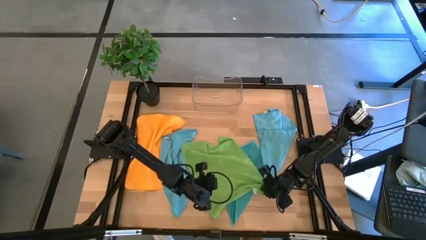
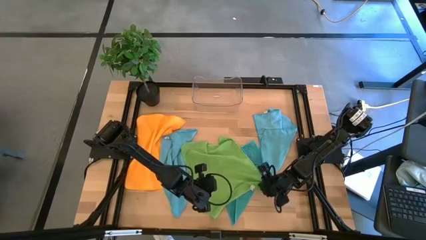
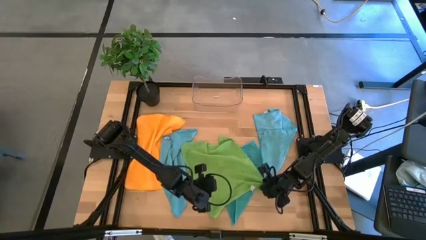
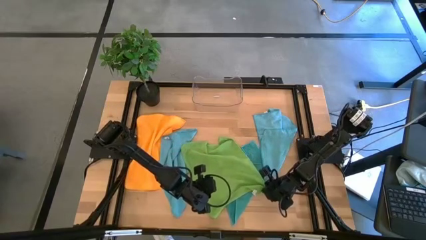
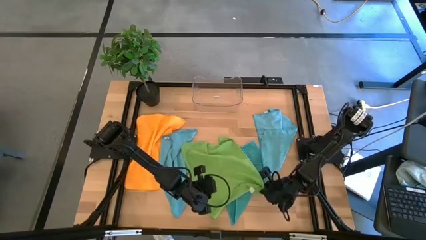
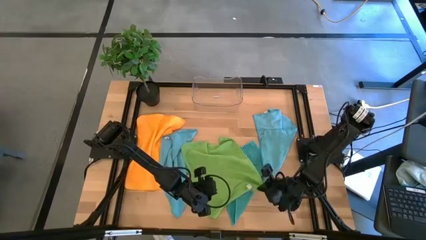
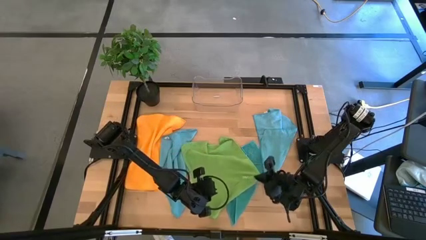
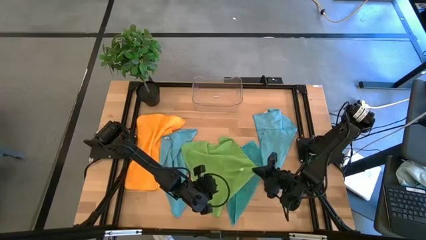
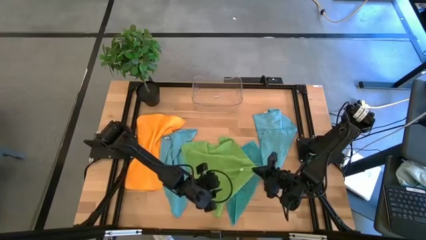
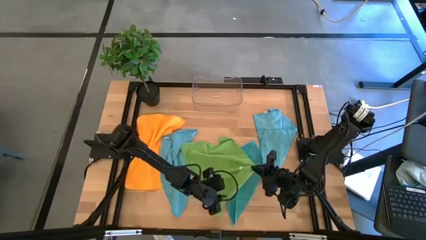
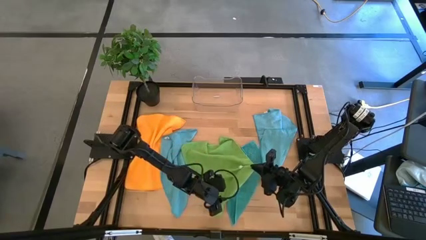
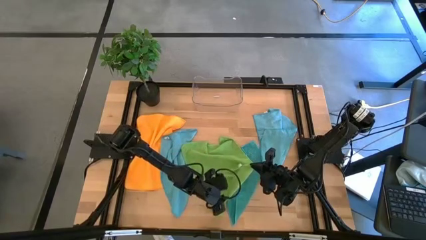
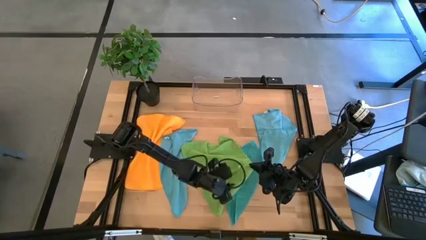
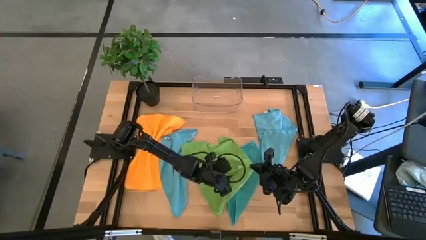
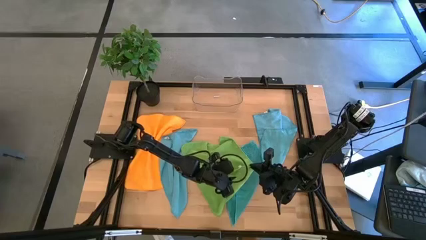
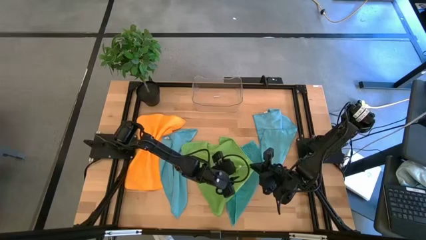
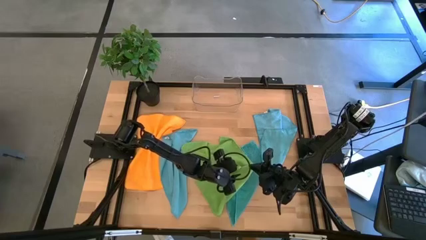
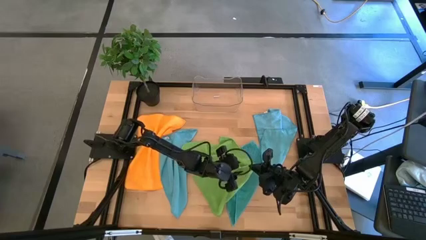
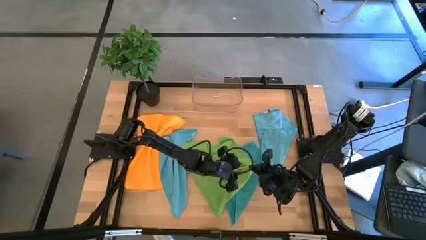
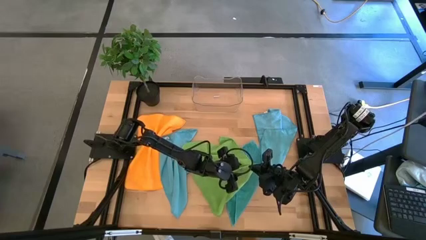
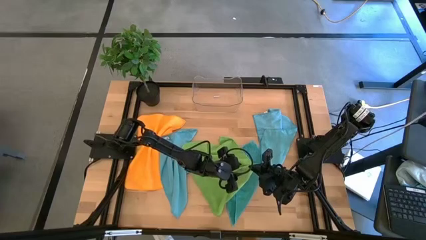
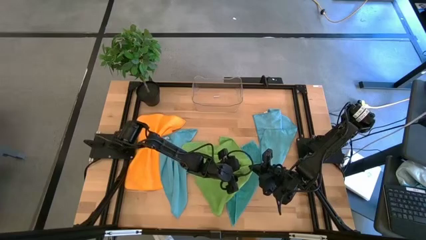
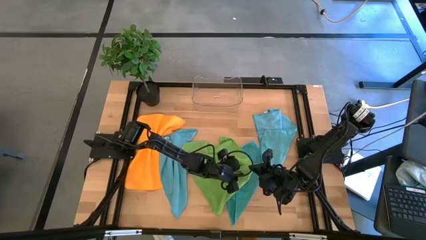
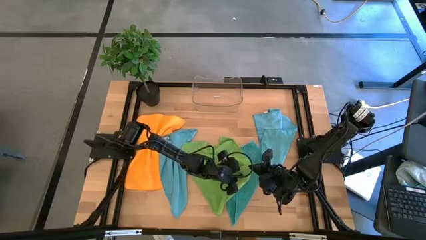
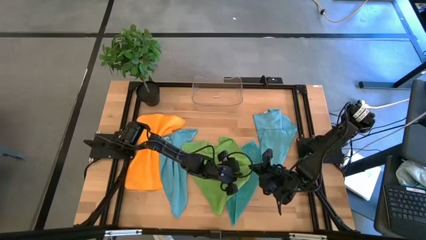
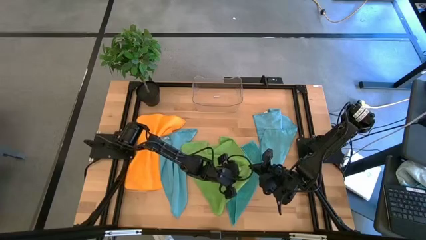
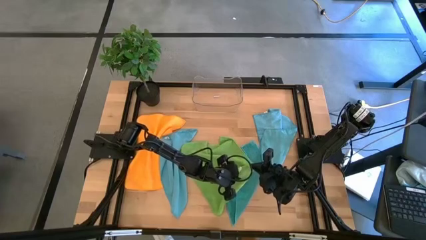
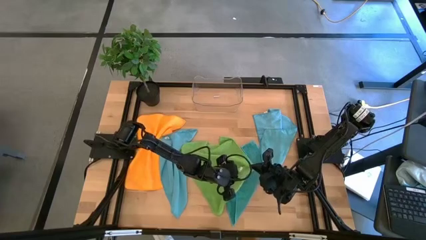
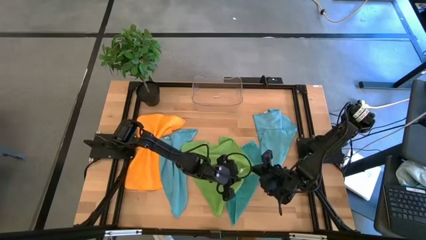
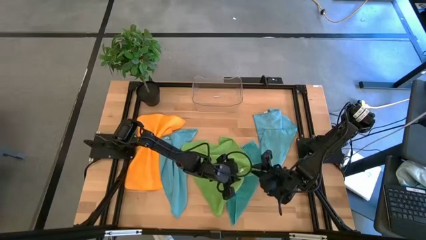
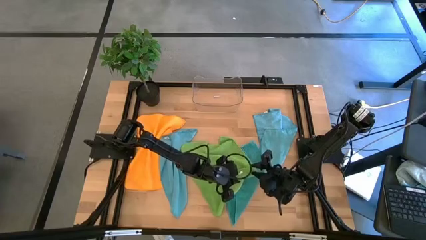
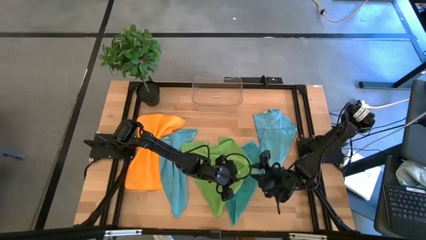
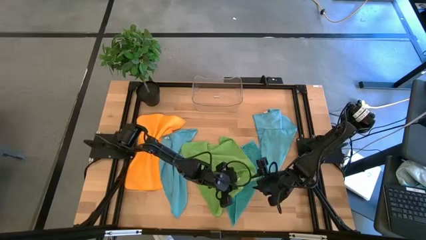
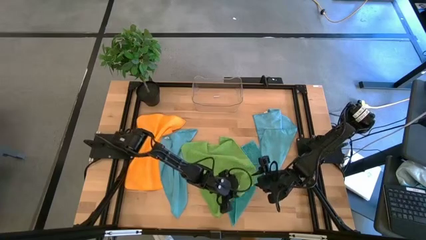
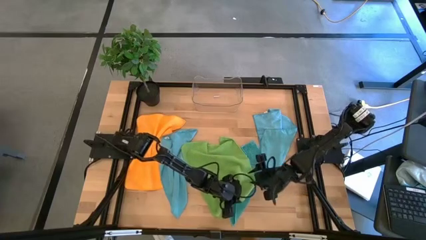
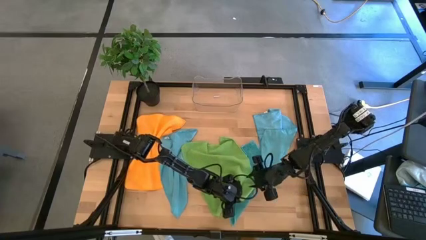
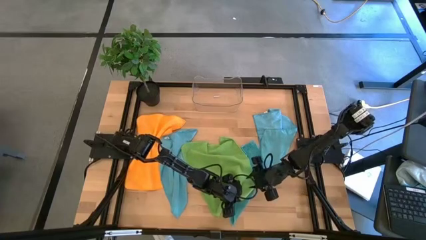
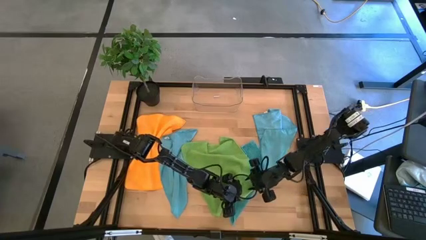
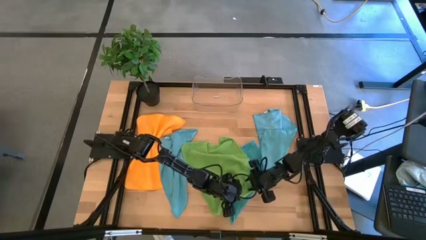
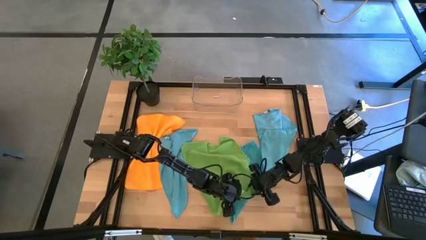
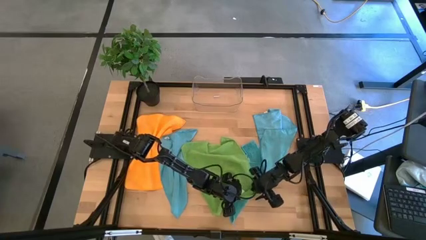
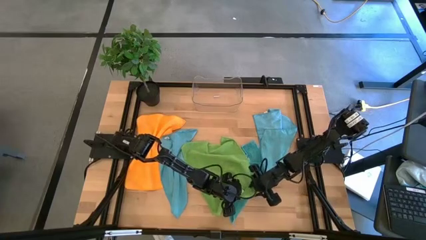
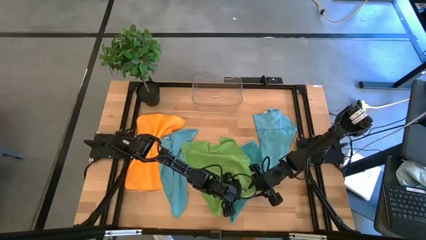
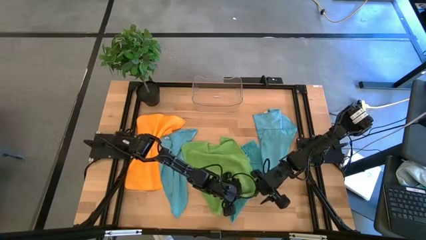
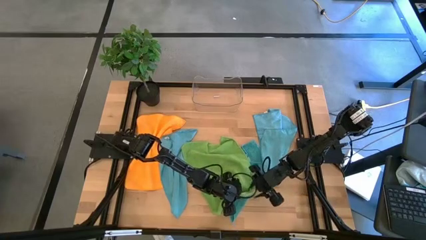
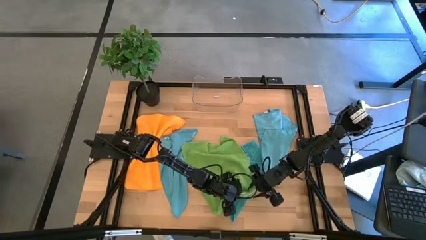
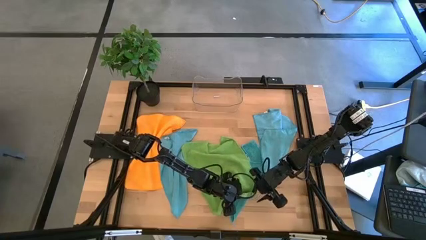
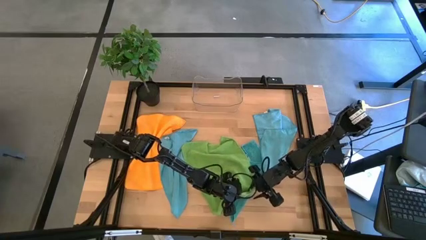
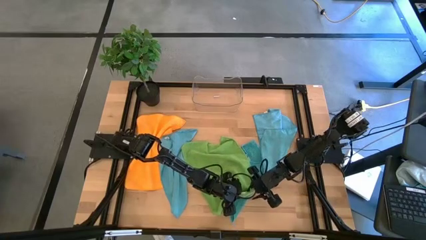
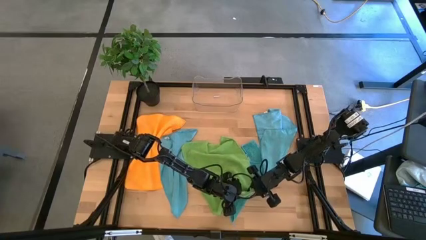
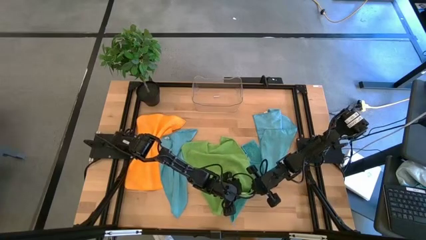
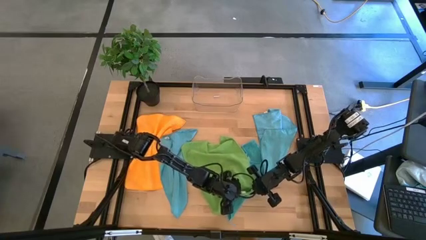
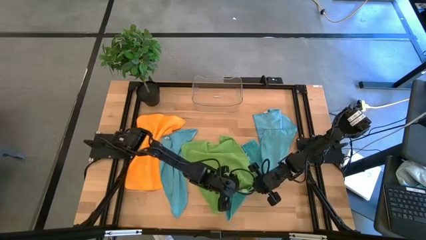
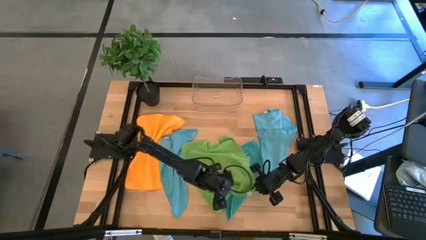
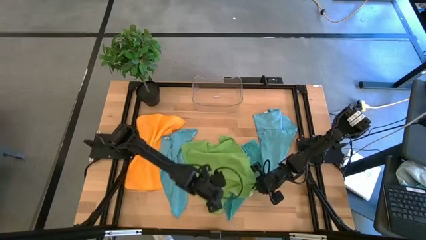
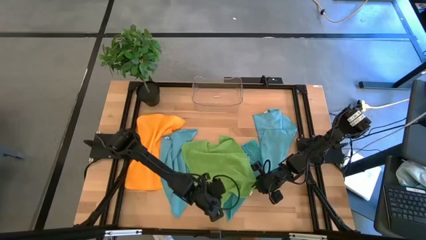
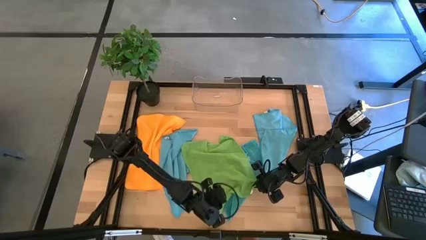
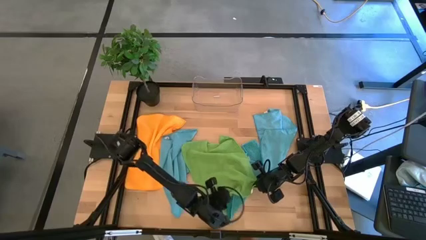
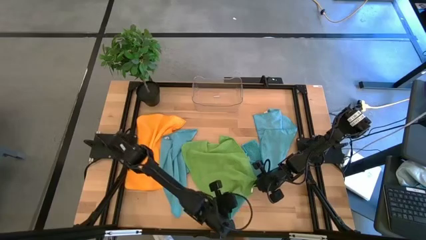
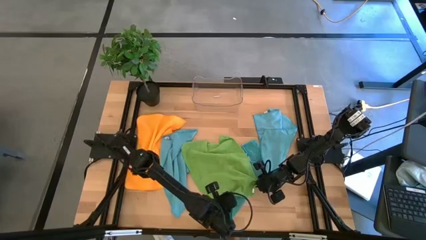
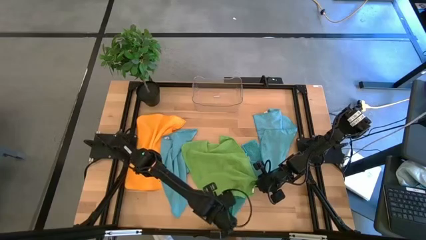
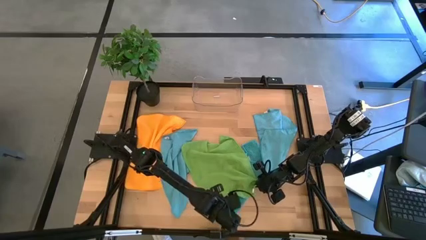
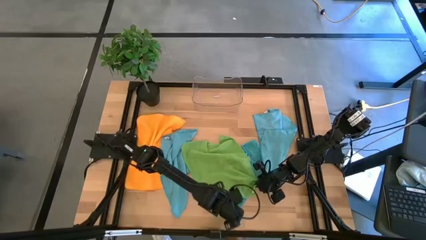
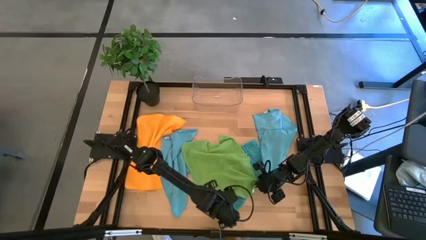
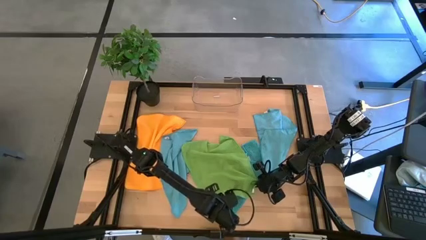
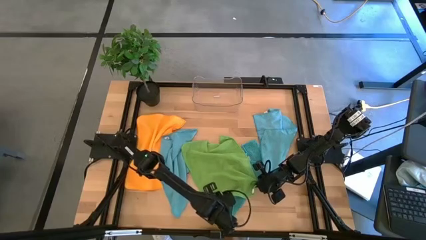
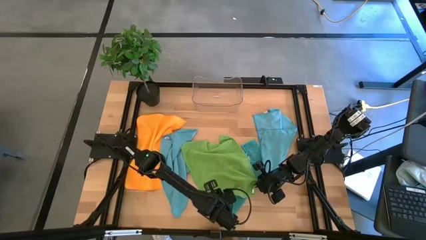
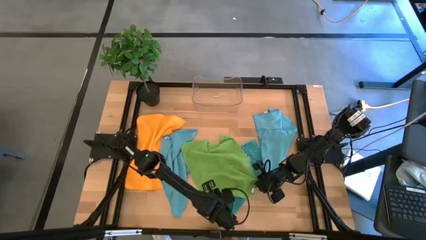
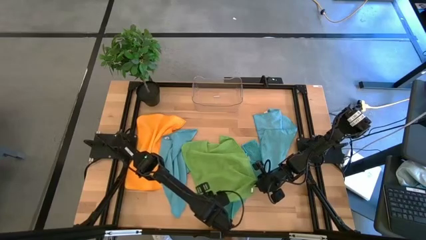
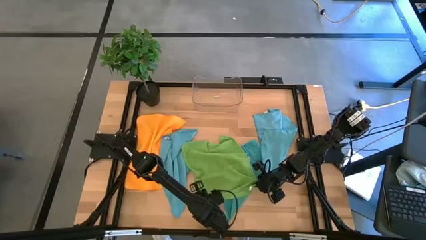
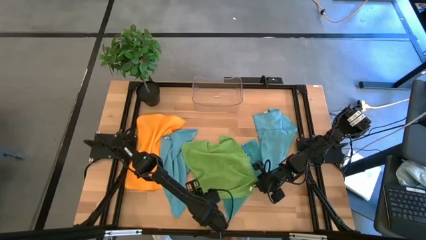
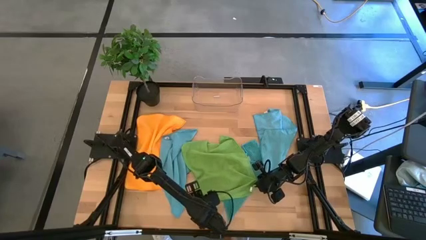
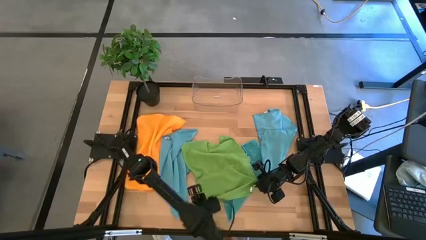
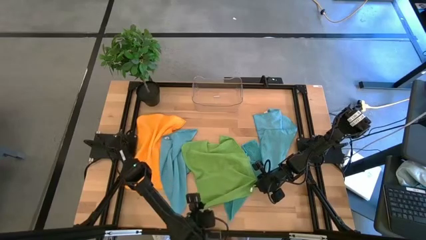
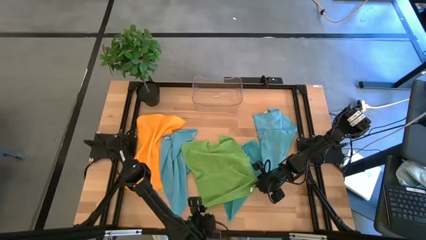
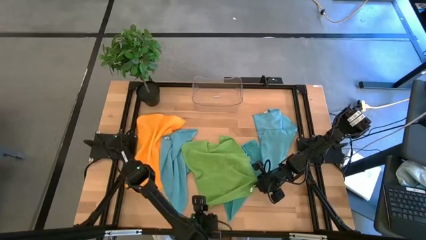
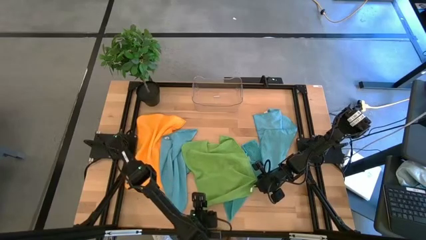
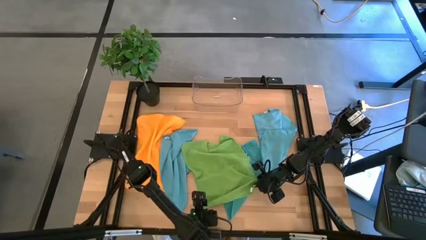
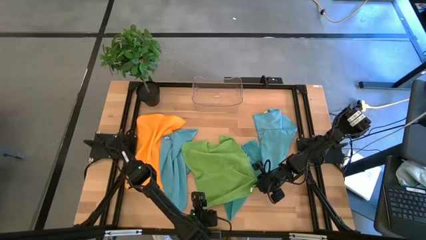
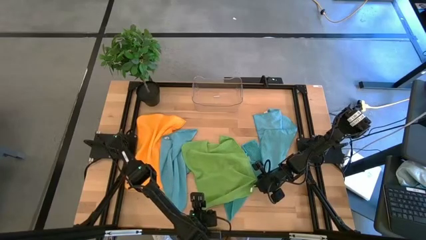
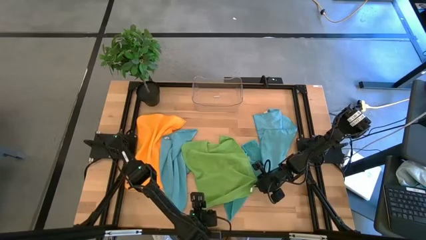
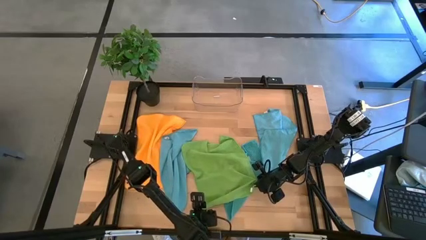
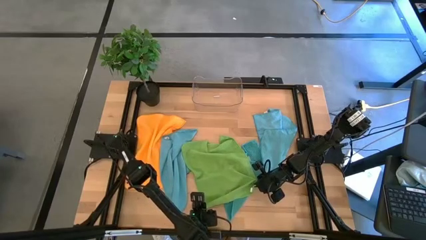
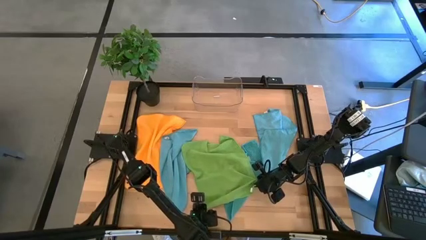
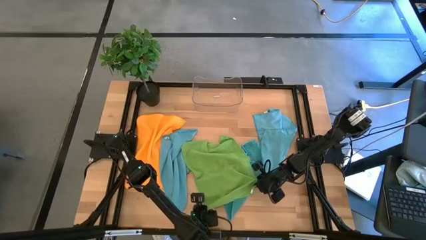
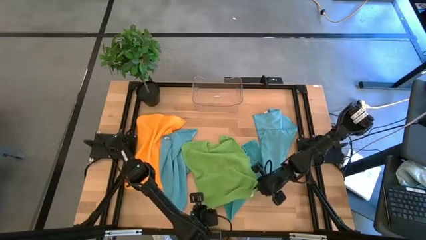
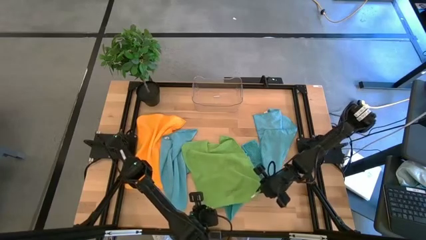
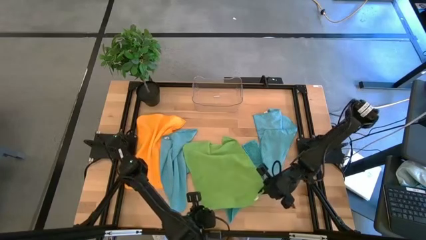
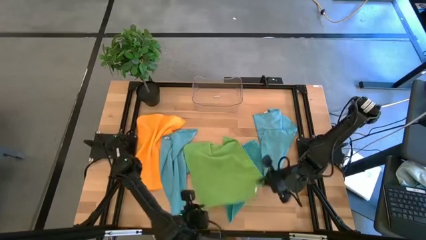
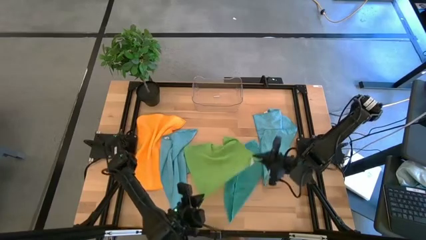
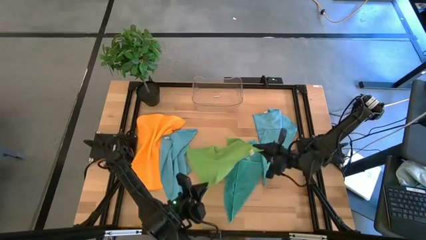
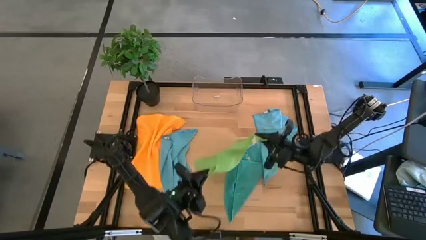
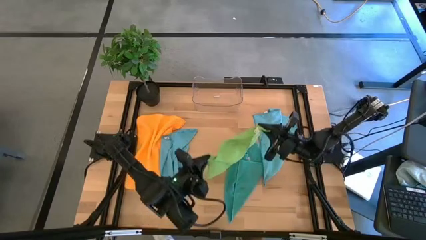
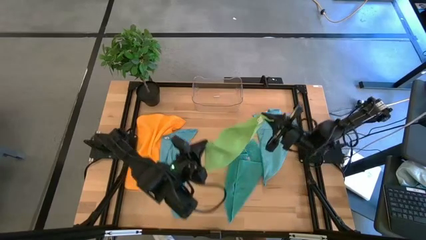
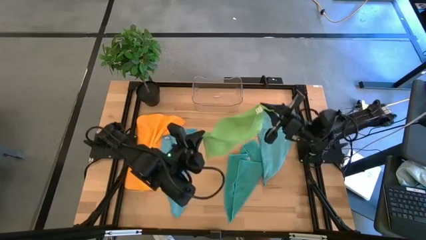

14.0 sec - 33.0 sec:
Task: Fold microfiber towels
Fold the green microfiber towel
